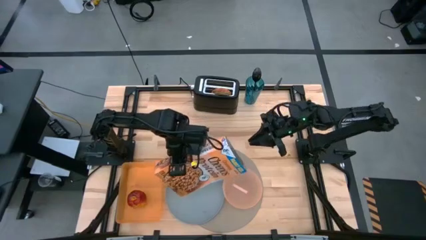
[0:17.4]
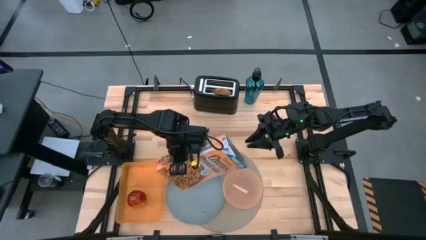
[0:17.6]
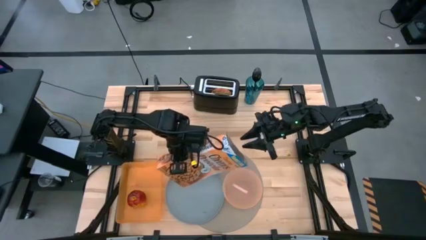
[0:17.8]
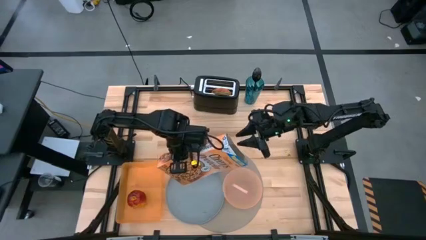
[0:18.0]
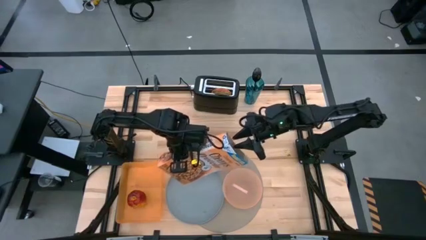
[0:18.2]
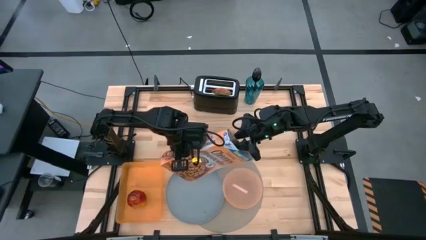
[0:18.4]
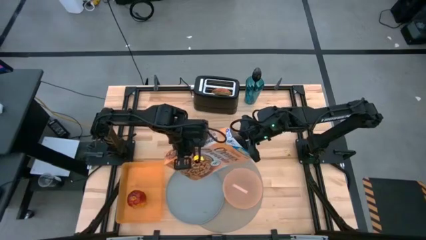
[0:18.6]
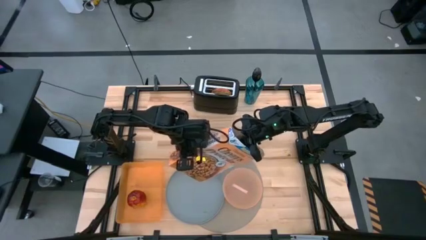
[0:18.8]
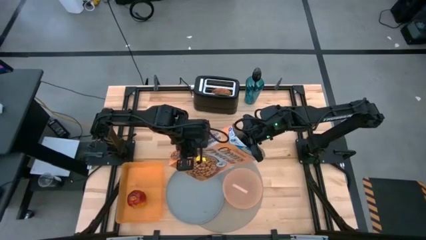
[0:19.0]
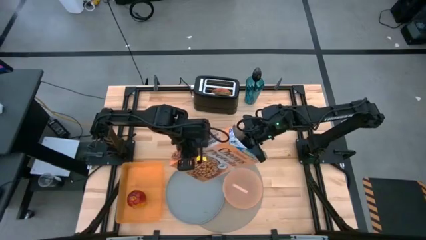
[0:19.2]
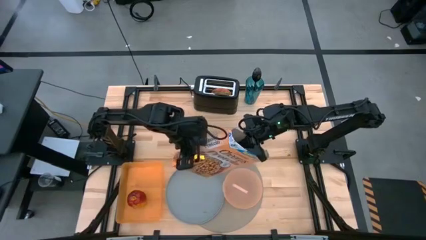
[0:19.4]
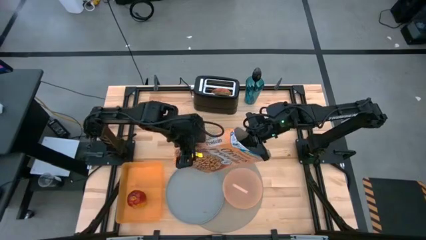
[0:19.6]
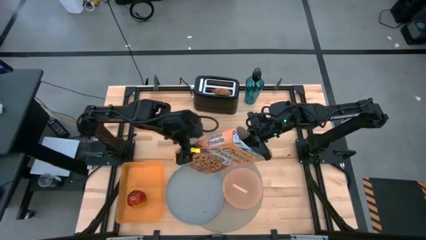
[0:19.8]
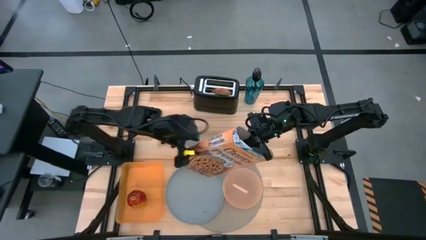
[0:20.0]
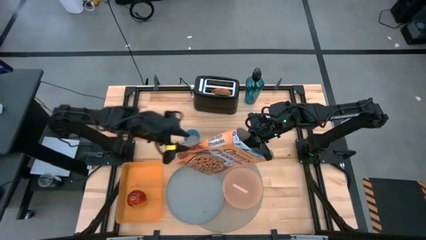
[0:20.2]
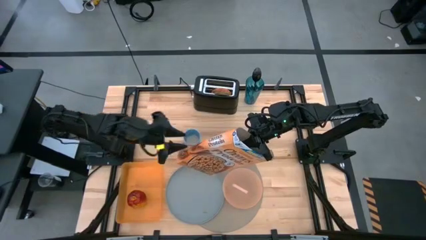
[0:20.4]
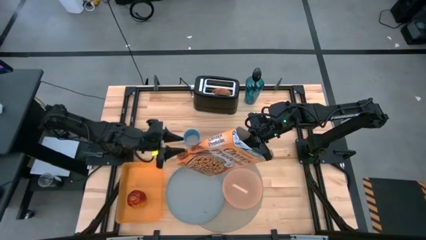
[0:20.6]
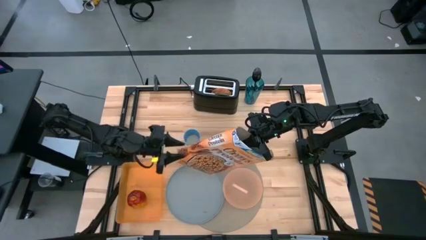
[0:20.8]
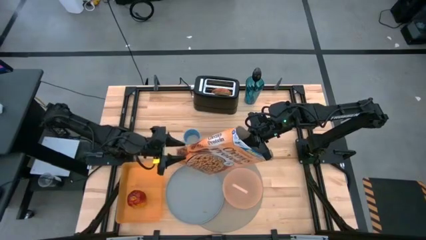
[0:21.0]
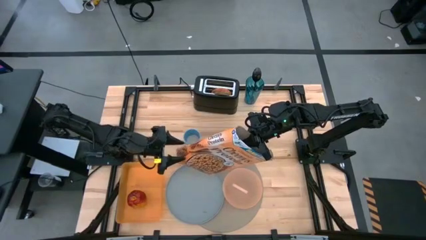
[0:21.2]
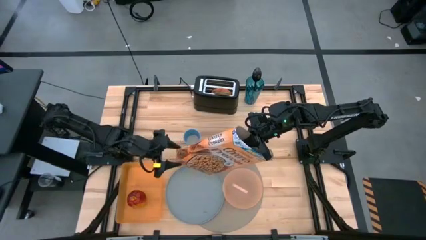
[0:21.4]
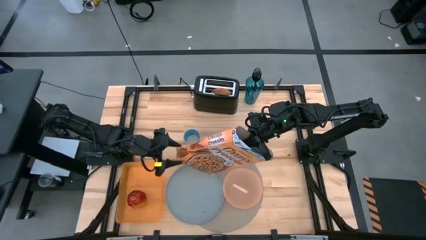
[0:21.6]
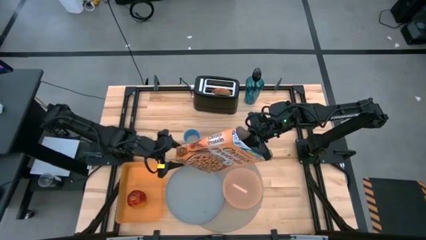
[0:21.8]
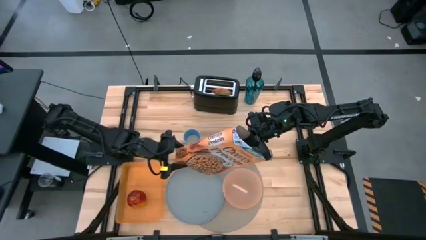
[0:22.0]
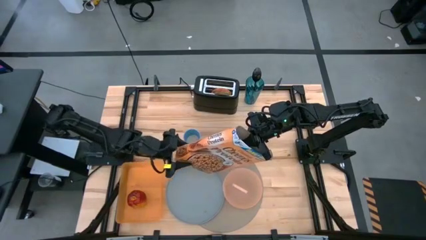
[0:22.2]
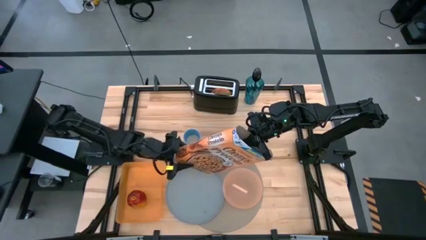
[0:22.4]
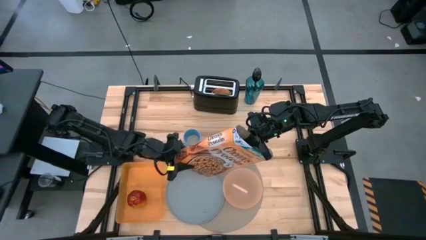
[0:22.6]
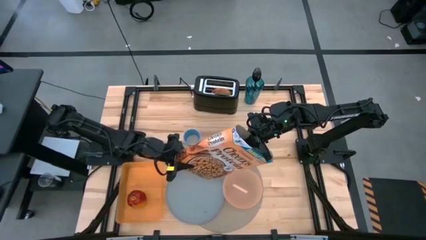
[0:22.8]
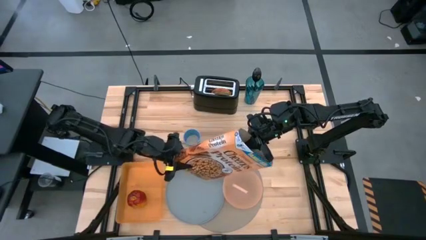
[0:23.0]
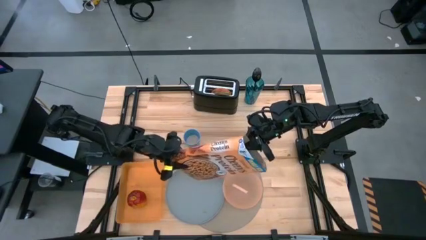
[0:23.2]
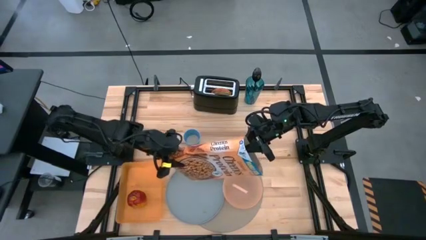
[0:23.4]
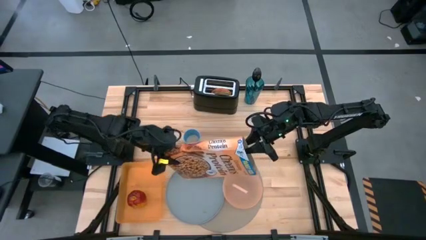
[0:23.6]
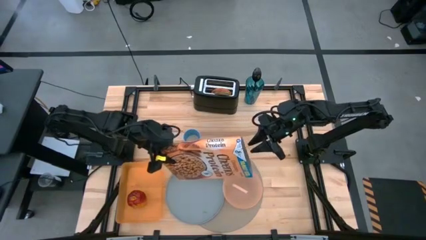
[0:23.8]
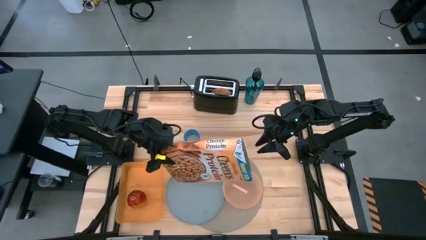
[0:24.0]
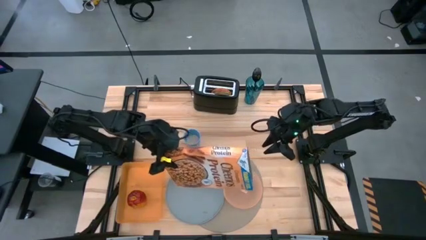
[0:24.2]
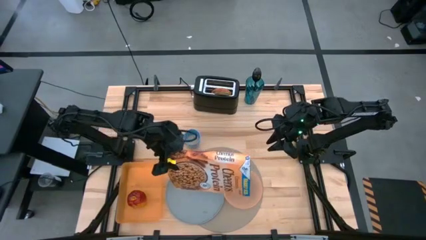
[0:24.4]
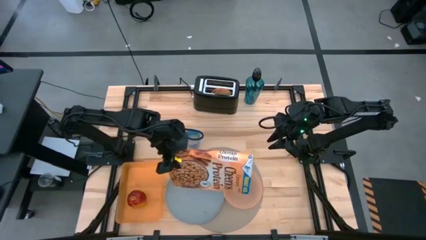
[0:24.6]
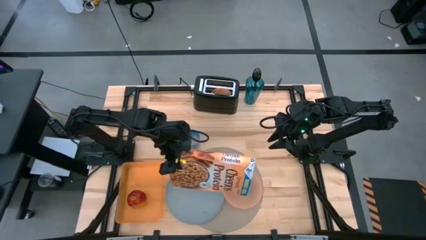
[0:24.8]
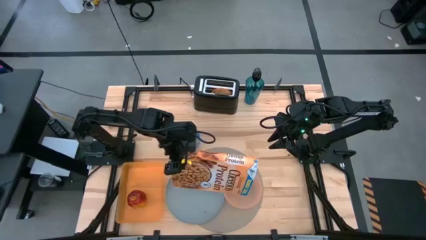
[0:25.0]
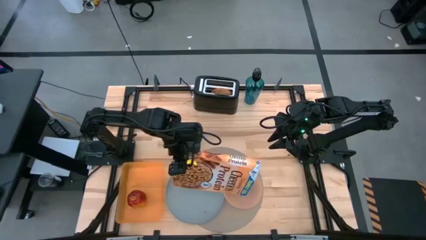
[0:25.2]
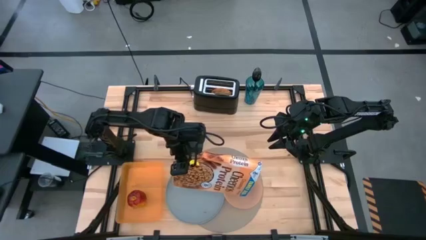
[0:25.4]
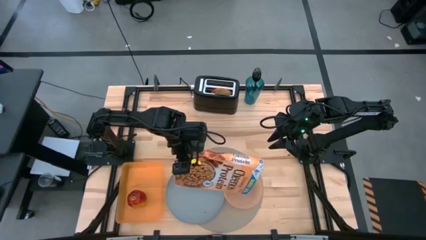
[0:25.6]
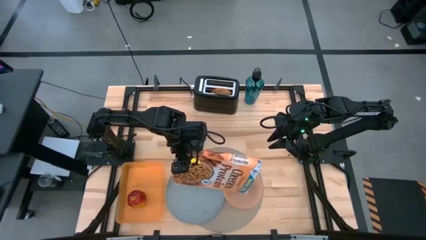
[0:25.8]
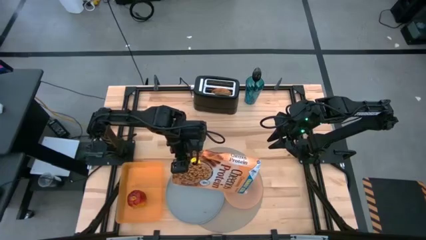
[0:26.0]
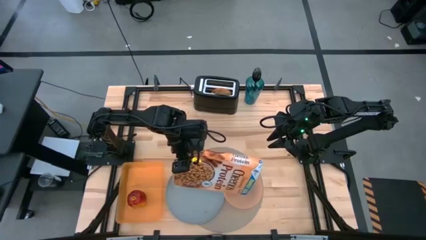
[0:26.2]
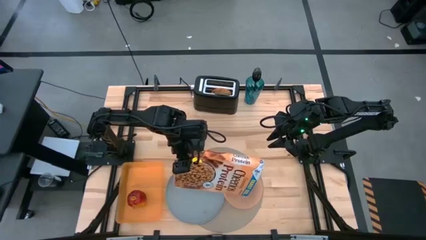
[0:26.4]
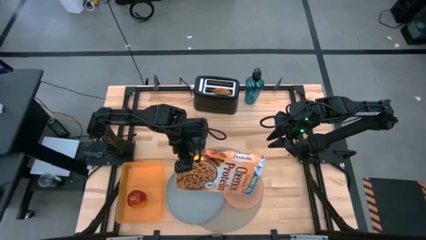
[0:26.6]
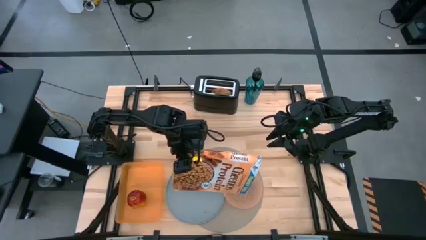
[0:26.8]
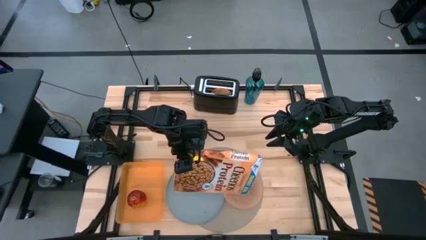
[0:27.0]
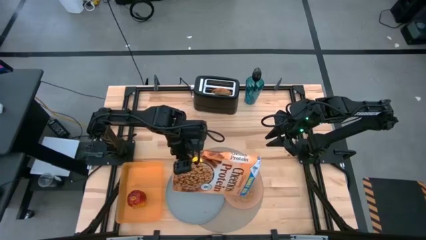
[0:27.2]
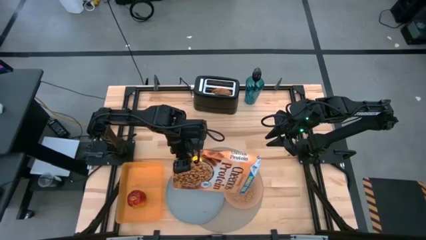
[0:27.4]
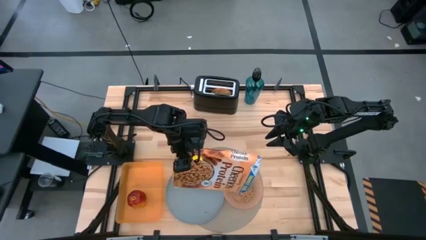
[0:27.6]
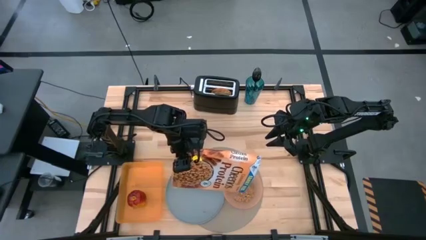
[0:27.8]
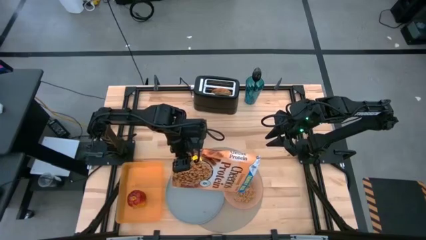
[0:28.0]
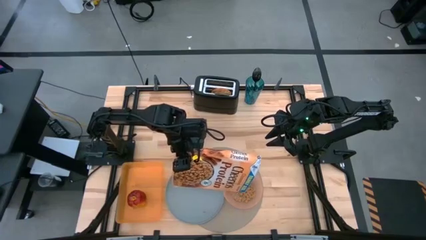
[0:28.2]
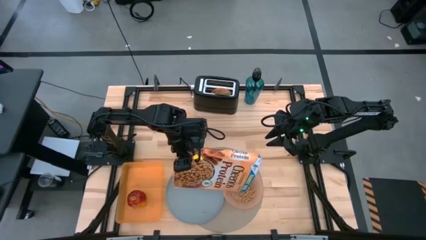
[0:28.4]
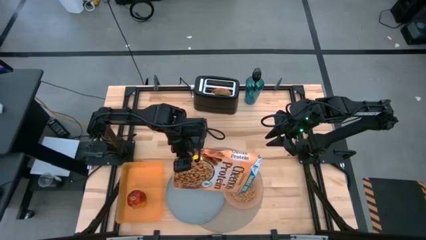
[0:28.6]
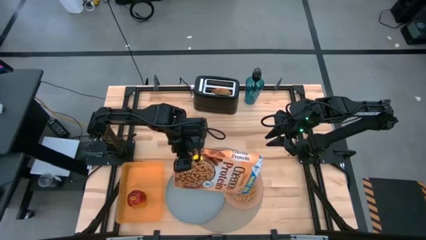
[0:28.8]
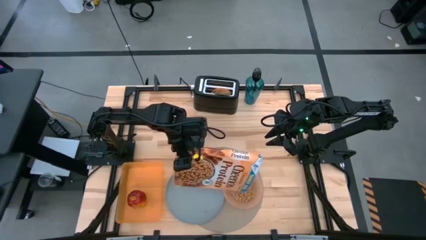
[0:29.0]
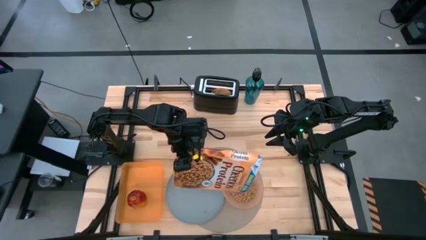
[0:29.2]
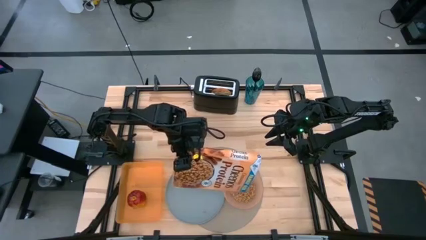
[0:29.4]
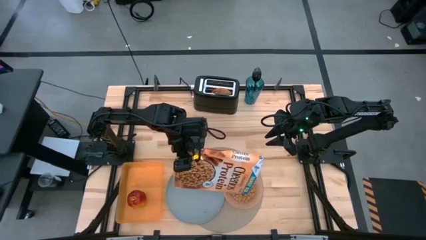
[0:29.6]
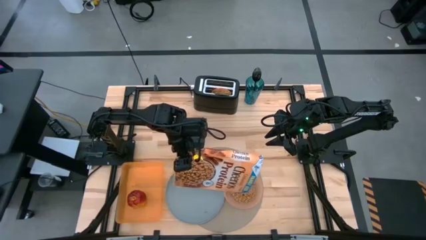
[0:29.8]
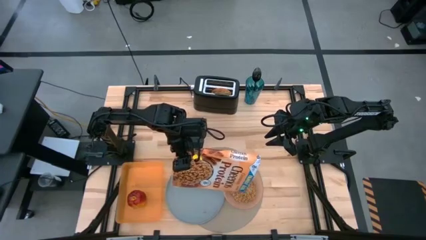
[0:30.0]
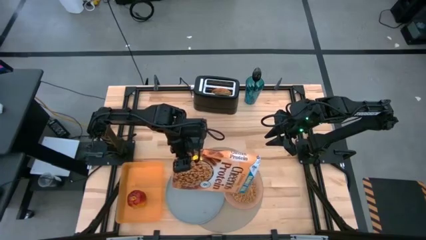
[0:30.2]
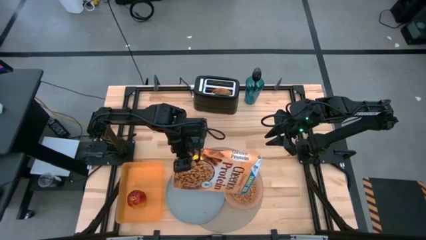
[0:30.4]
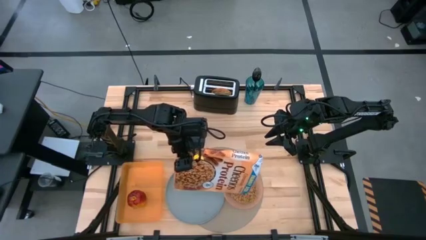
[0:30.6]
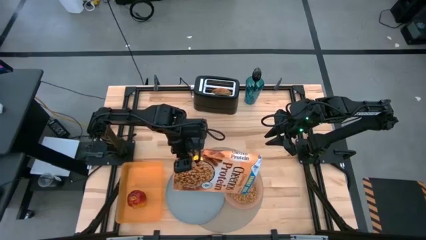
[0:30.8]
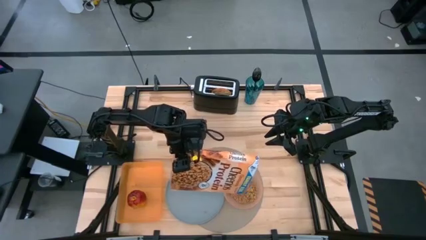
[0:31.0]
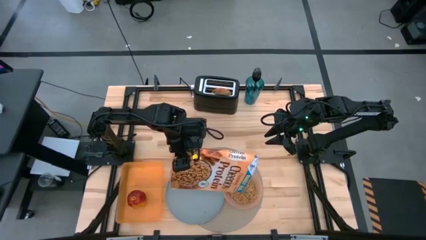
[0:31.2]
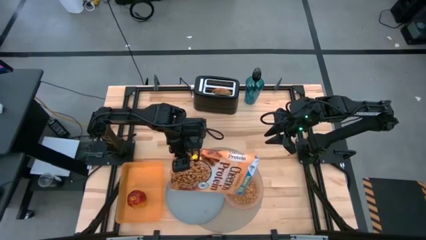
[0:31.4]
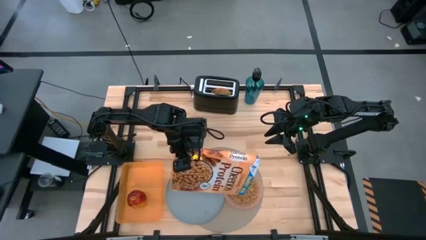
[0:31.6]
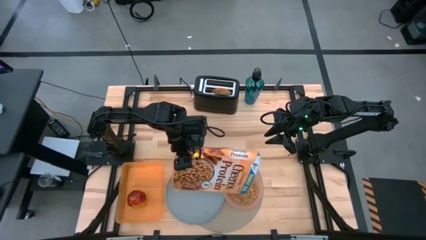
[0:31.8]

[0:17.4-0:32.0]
Task: Arrange a breakfast setting
Pour the cereal into the light pink bowl
